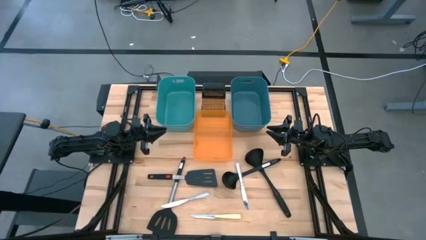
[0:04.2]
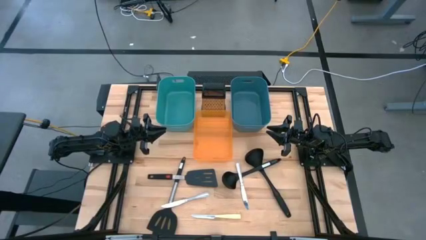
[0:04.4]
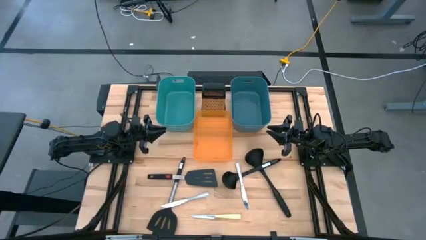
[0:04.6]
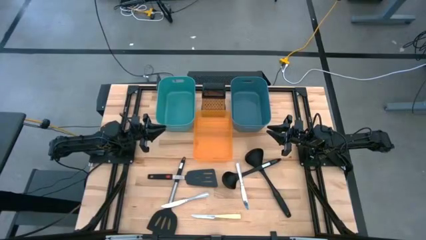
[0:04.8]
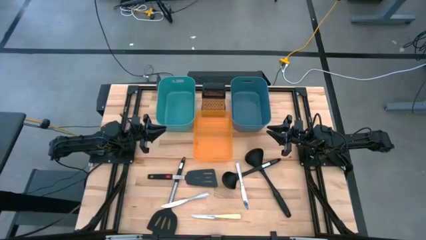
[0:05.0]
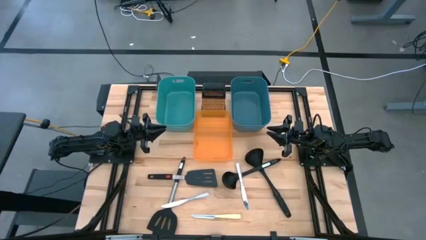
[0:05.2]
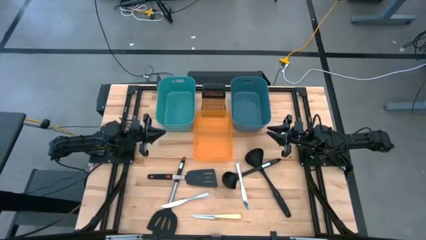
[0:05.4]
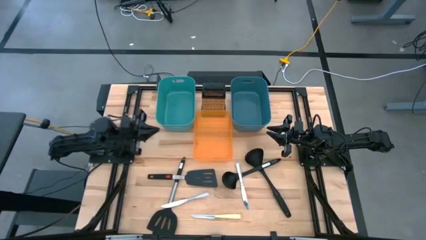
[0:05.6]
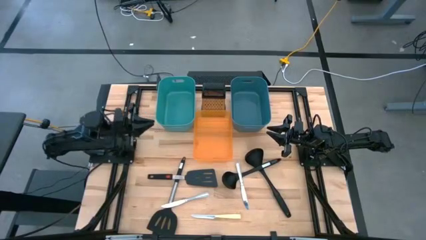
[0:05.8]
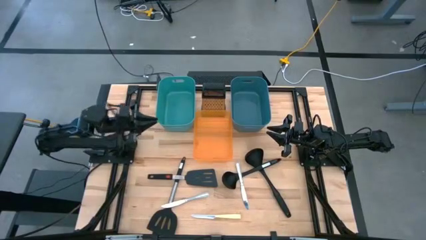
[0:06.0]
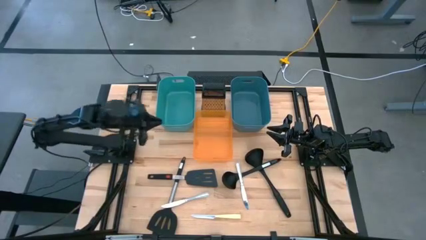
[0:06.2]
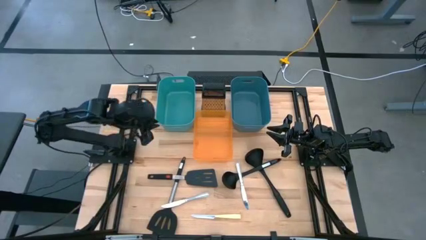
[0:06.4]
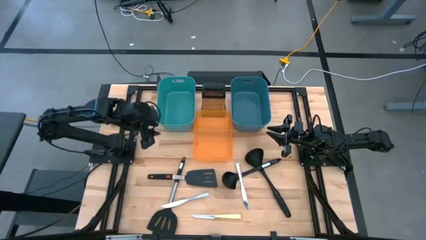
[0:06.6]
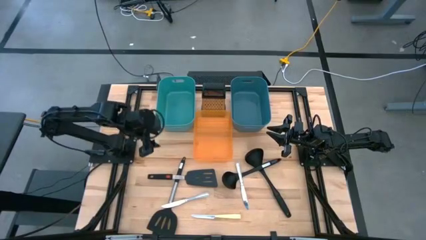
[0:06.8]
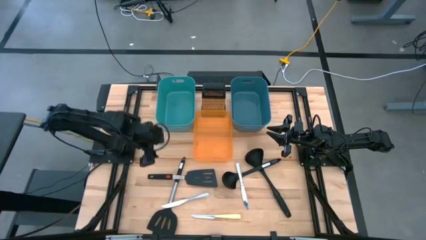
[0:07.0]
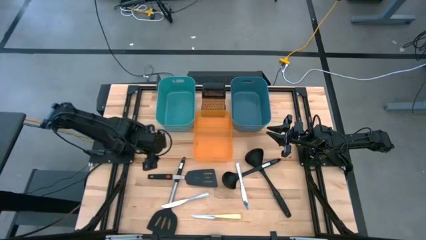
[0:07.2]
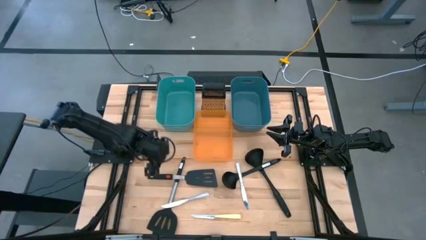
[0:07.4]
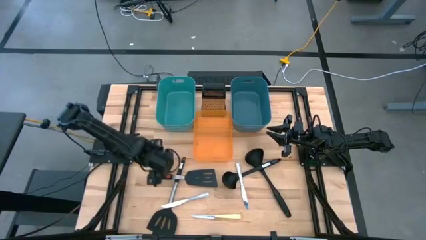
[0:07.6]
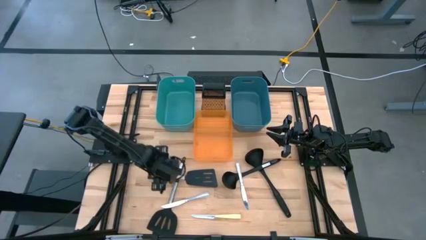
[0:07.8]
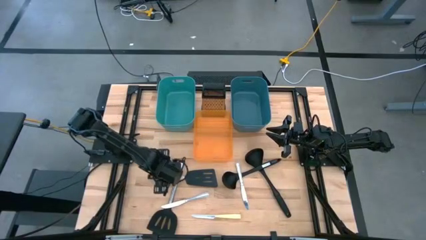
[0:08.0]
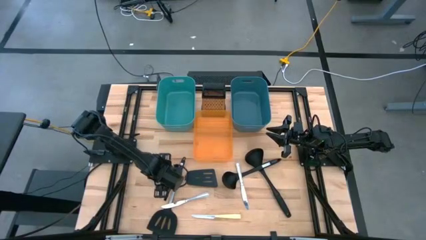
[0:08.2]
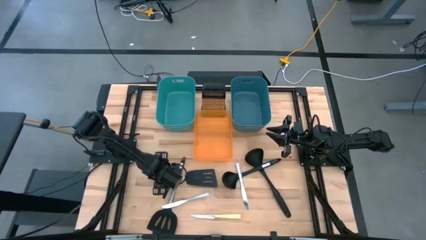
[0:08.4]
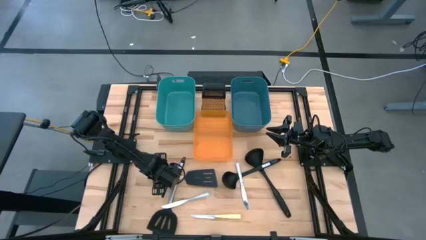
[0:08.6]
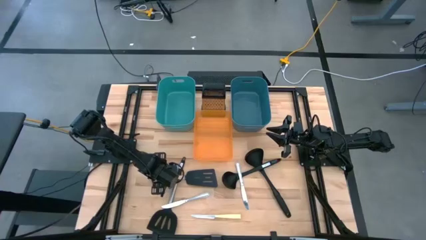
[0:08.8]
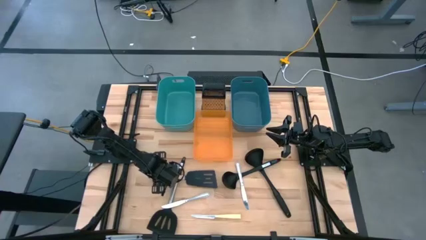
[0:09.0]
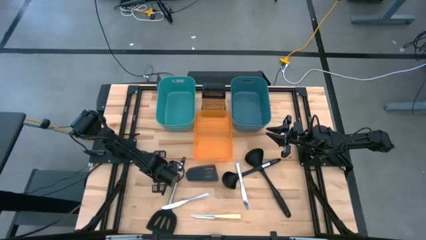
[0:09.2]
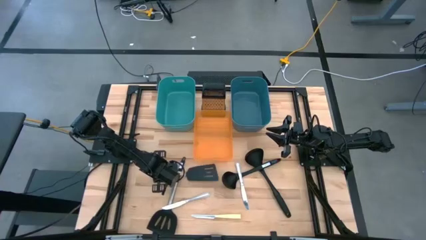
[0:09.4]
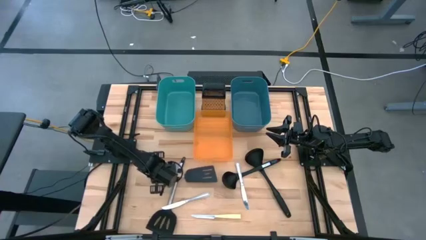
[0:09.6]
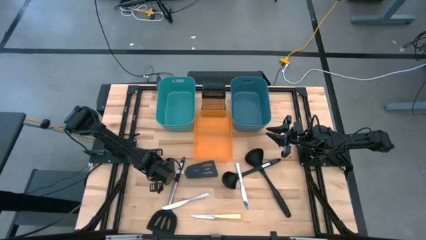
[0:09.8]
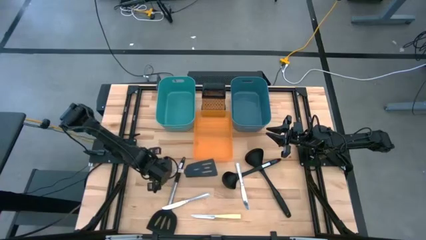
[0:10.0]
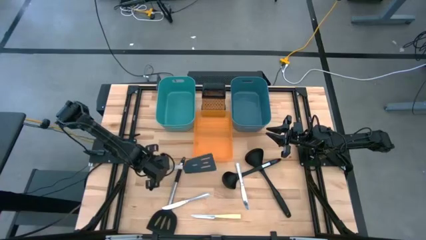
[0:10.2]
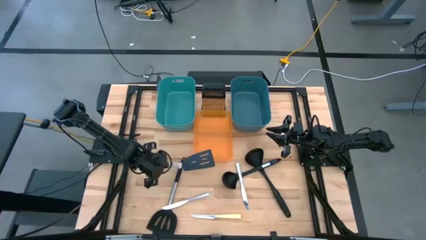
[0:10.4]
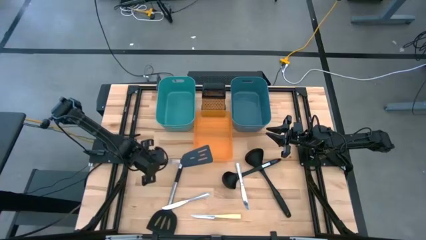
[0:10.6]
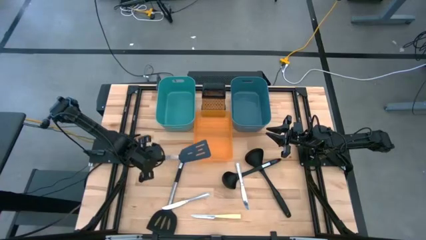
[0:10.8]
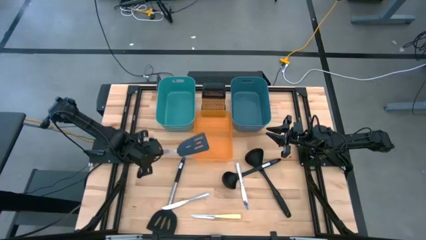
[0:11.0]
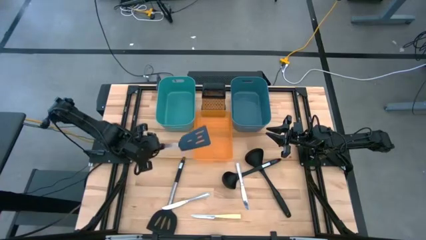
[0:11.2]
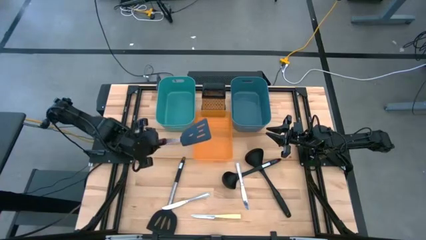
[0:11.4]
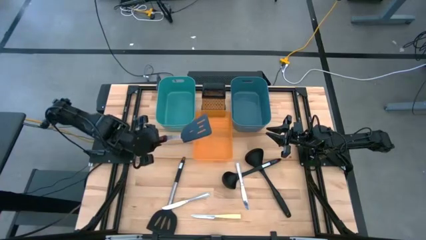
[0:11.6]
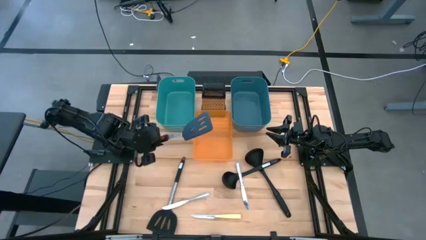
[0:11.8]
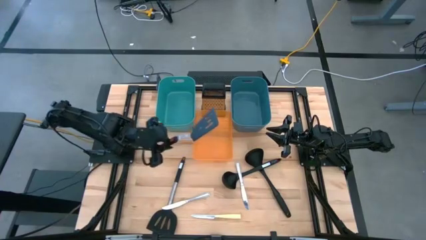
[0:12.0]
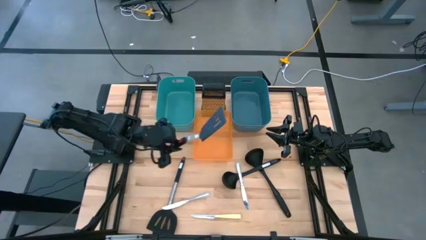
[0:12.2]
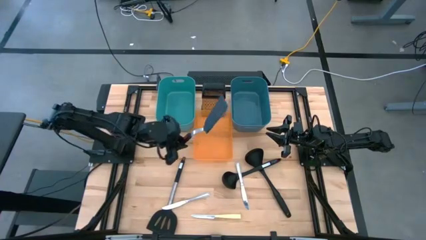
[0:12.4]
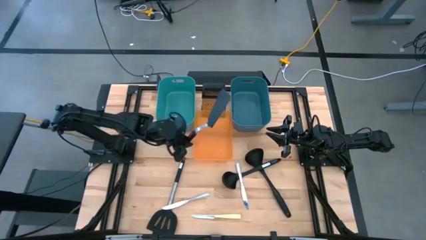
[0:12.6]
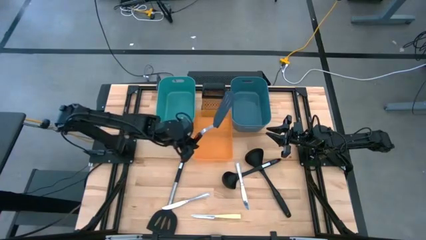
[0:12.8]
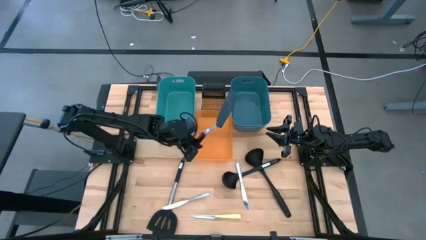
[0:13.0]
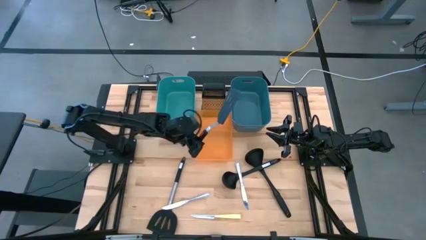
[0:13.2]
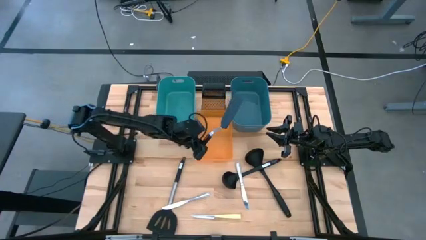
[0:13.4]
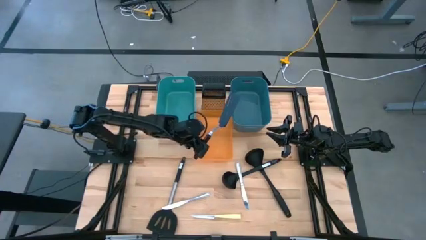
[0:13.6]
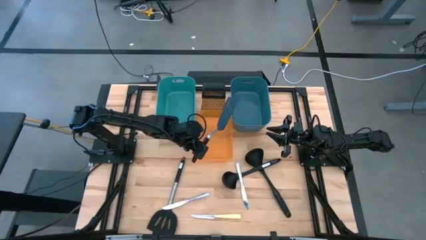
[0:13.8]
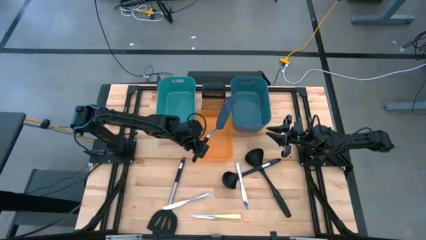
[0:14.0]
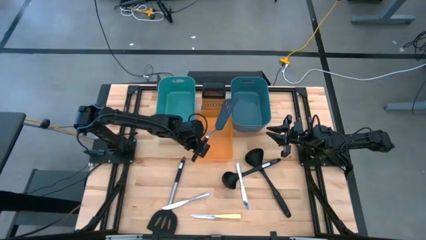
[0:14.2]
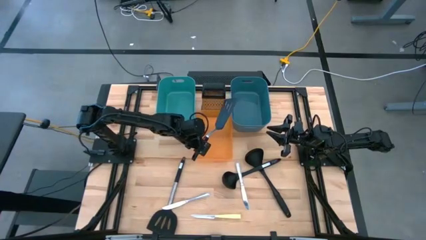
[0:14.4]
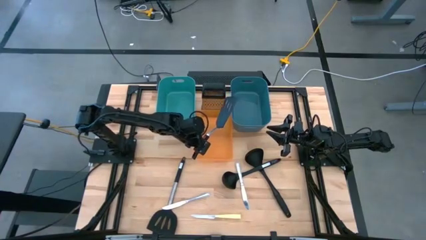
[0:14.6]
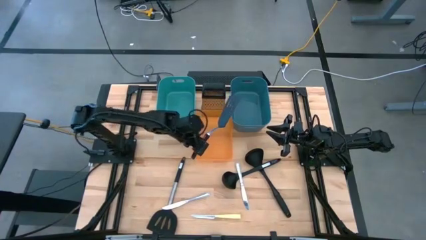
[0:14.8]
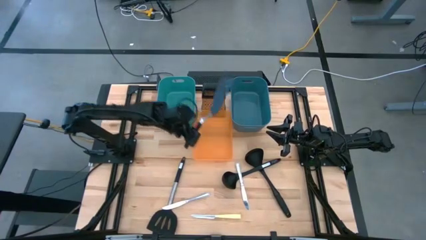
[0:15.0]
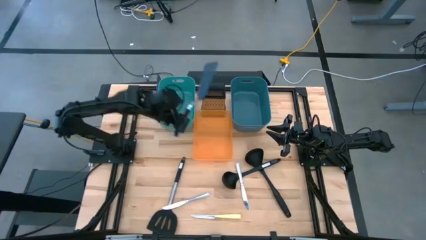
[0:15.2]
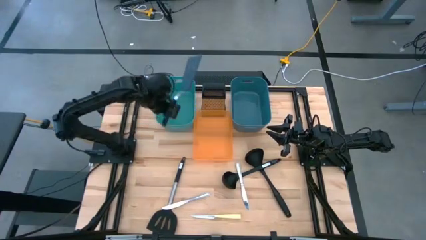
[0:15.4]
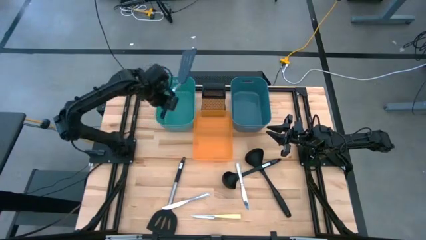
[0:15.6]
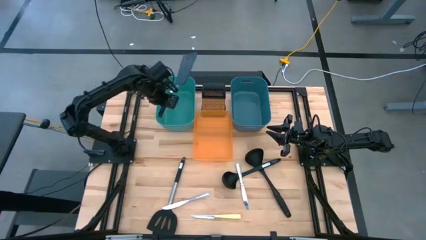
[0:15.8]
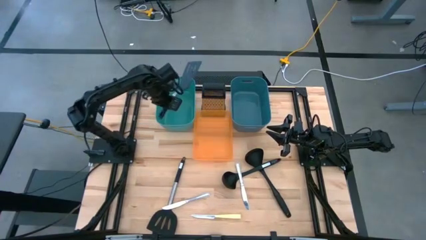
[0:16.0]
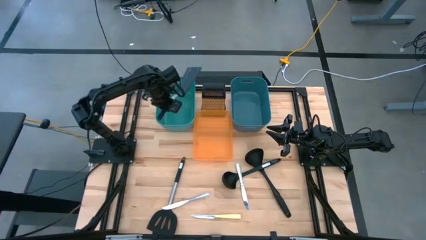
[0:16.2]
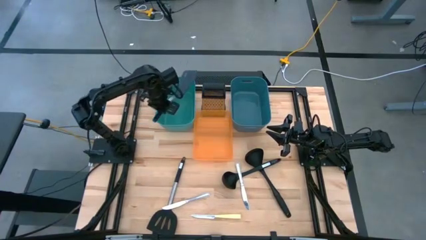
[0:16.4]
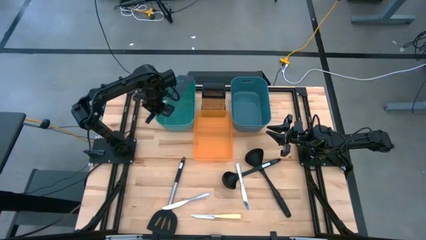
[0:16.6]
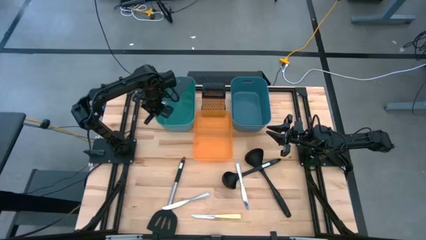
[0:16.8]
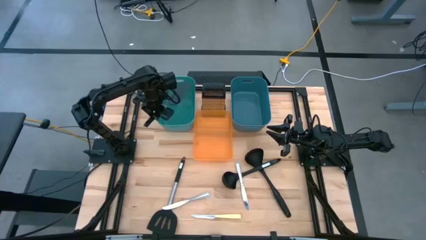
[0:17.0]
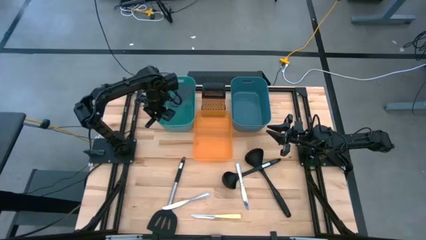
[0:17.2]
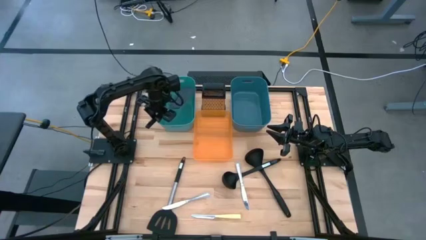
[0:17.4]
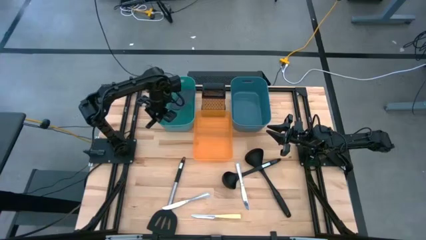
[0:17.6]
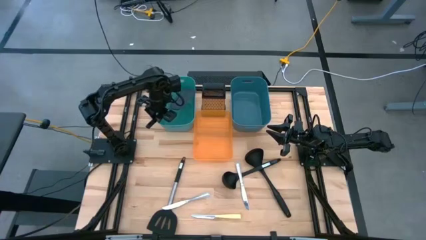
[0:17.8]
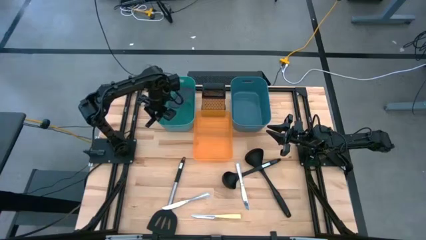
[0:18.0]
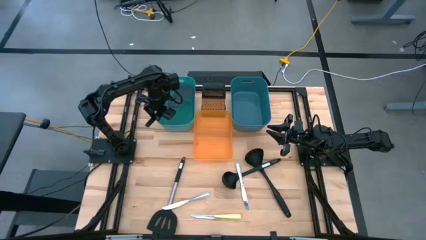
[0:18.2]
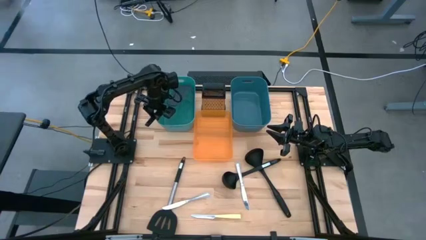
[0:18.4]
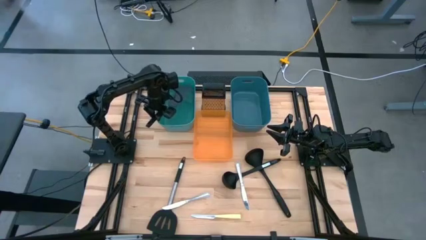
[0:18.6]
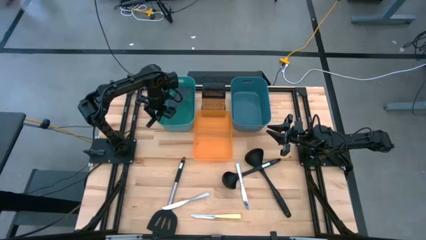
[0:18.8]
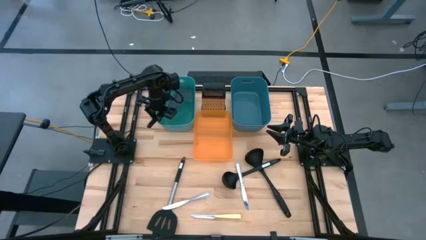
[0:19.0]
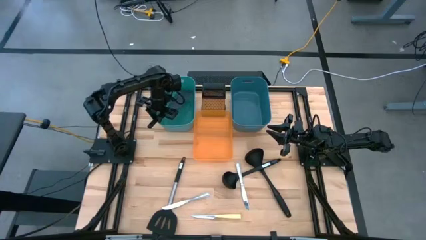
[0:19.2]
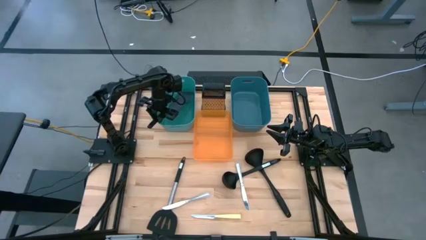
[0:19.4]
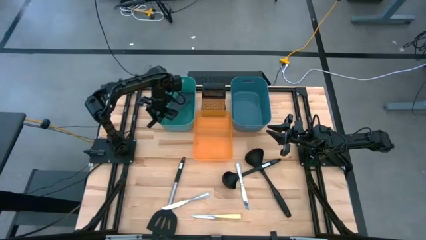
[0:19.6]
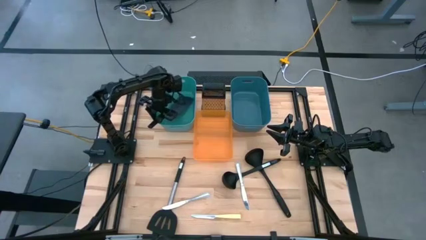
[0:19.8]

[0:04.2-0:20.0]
Task: Pick & Place Kitchen Items
Put the top black spatula into the green bin
